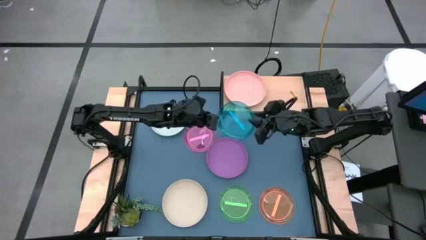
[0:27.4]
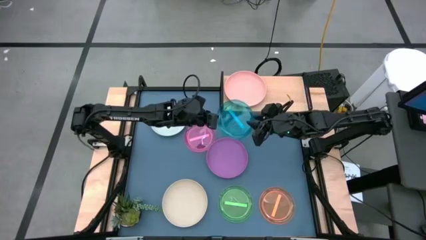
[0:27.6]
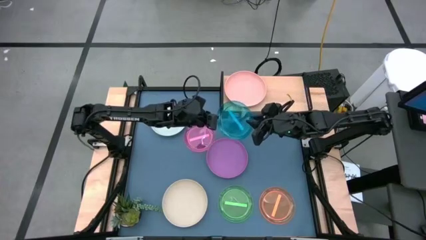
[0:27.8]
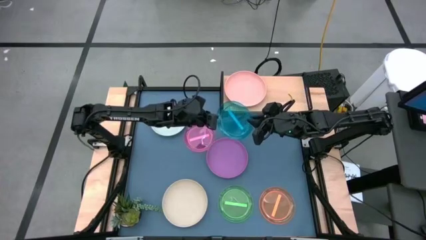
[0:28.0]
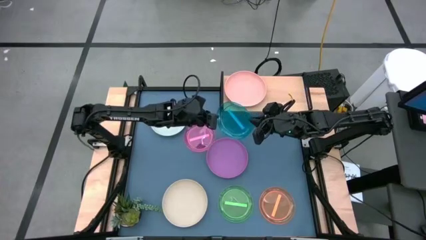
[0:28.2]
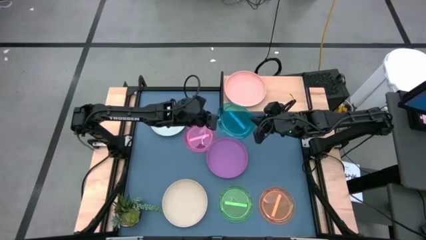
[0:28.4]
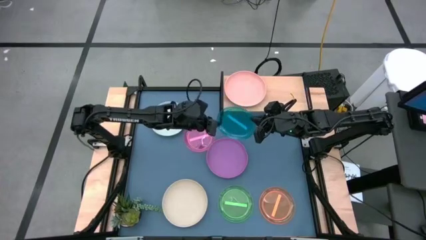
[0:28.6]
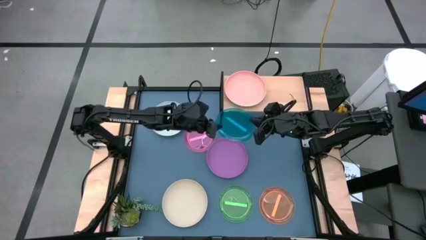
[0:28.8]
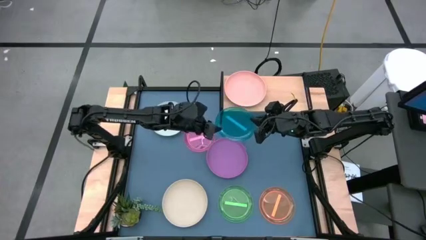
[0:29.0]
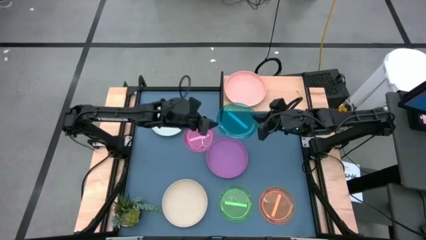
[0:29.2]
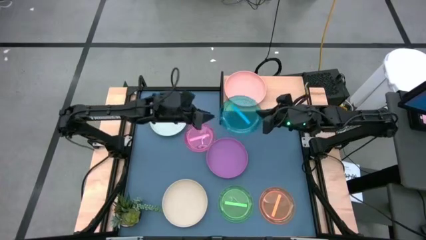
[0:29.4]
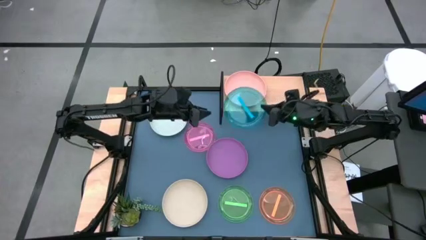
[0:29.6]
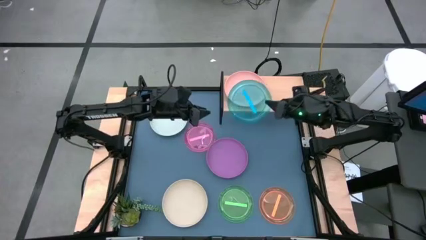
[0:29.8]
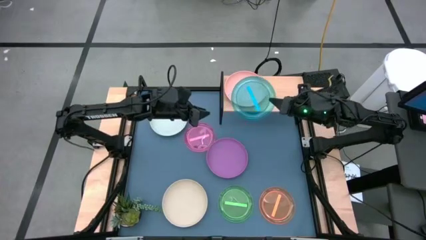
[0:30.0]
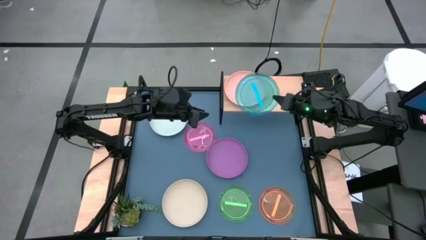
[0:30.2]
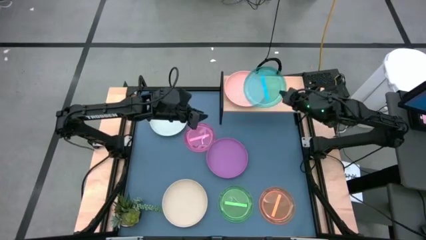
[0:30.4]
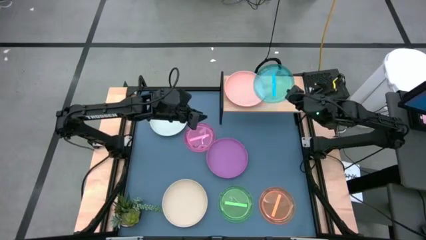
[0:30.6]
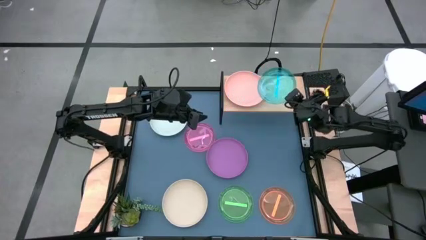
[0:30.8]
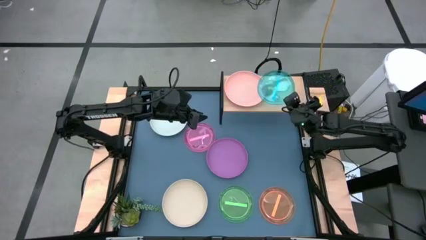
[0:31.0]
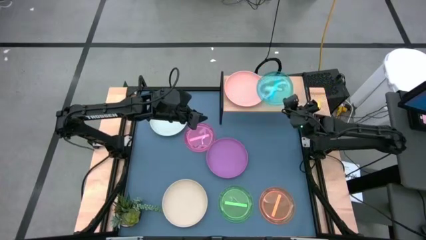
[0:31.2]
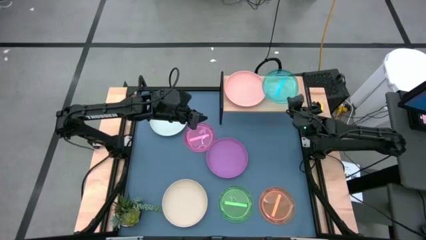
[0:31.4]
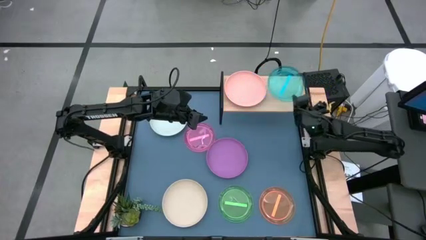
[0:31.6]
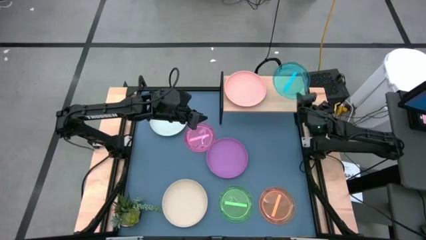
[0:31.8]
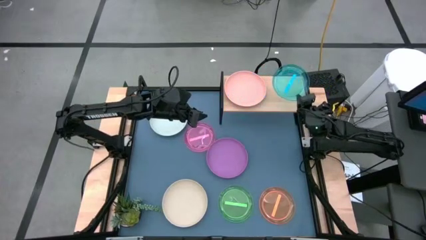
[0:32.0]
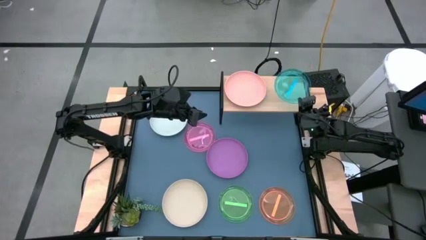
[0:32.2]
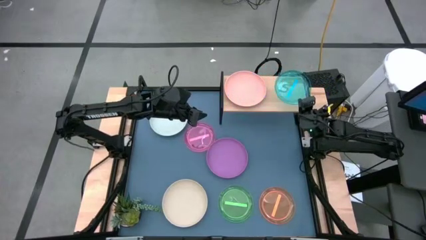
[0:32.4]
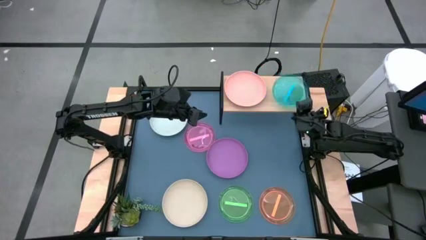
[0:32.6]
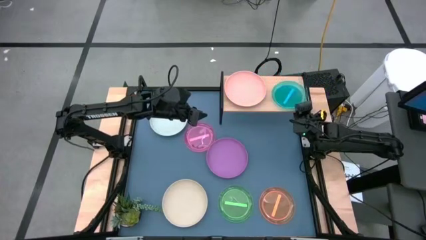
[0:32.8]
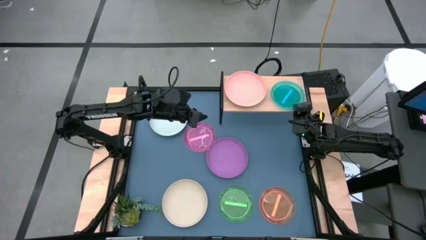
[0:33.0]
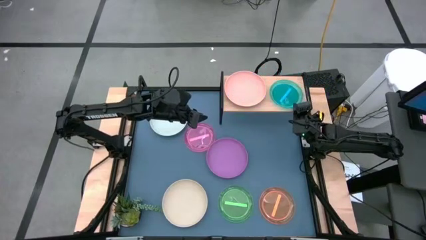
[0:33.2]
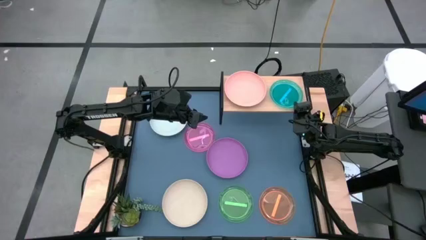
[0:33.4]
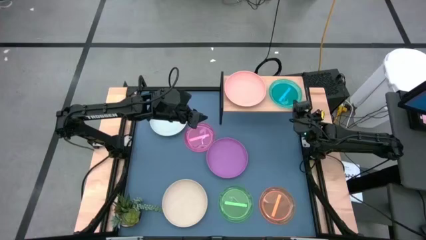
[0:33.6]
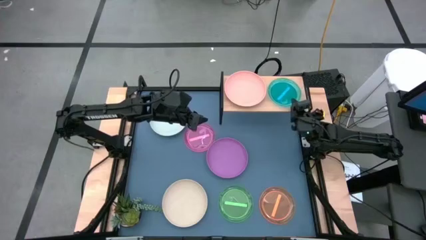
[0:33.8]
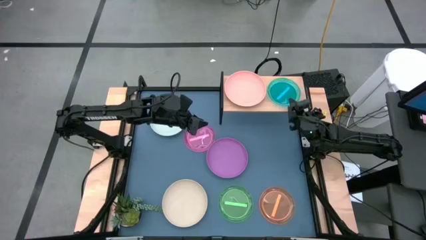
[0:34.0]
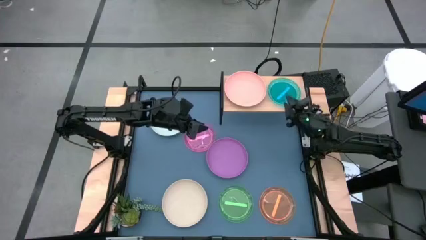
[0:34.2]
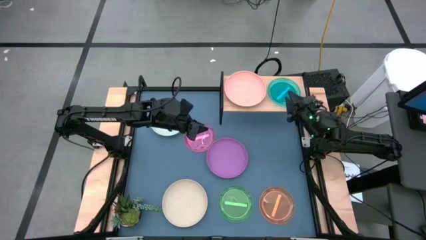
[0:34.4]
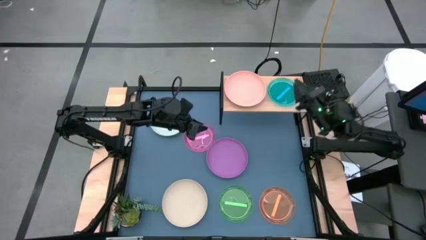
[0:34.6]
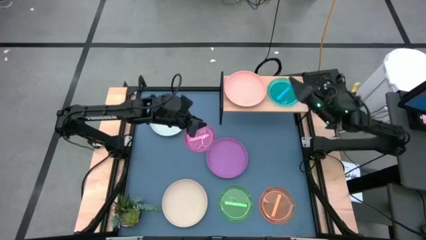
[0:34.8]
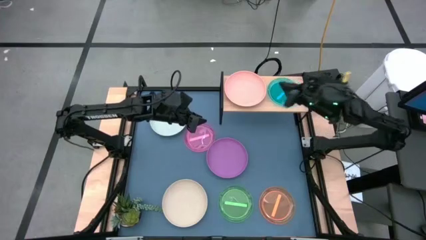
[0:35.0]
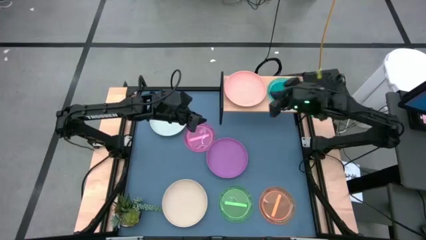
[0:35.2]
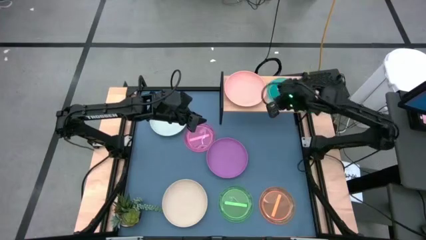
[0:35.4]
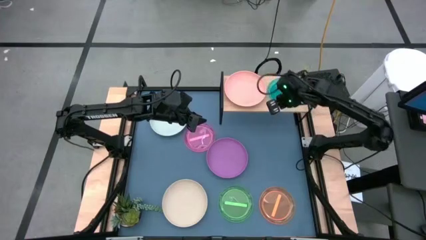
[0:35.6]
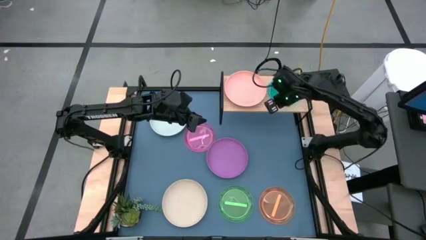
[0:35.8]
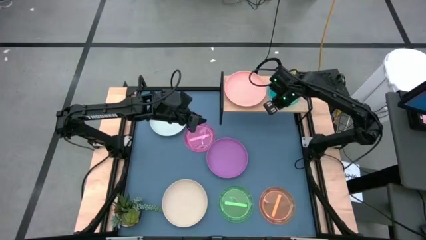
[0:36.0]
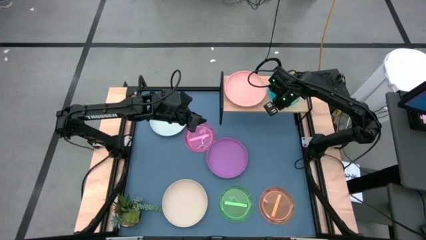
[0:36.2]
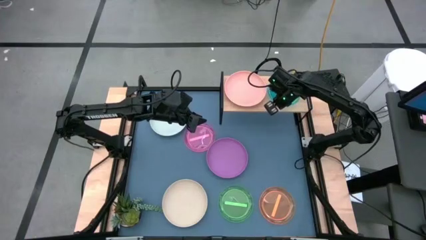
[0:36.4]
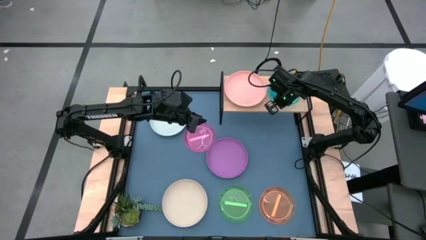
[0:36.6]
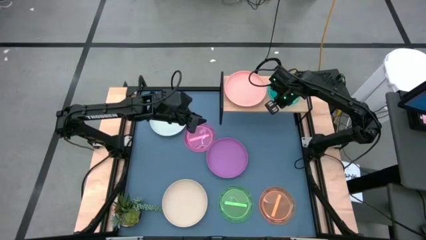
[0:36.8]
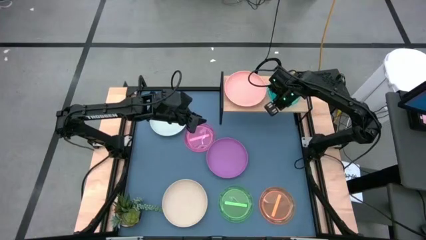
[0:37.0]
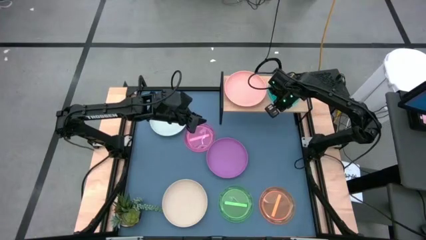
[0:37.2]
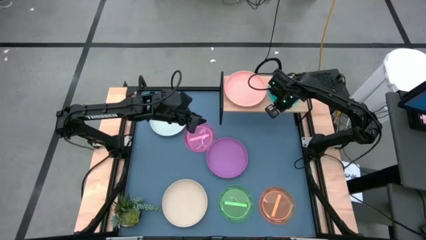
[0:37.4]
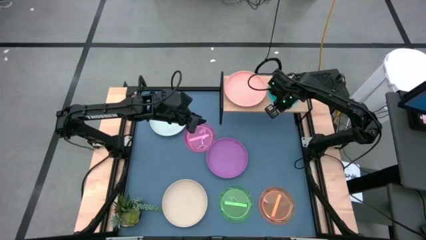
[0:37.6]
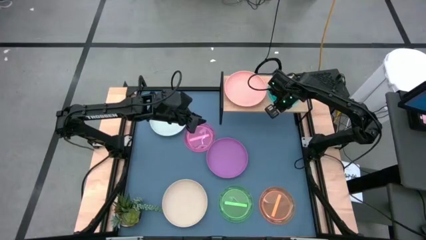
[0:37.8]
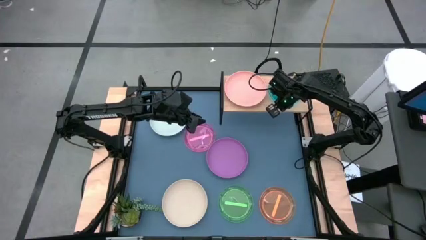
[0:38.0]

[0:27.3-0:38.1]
Task: Place and stack plates onto a shelf
Put the small blue plate on the shelf
